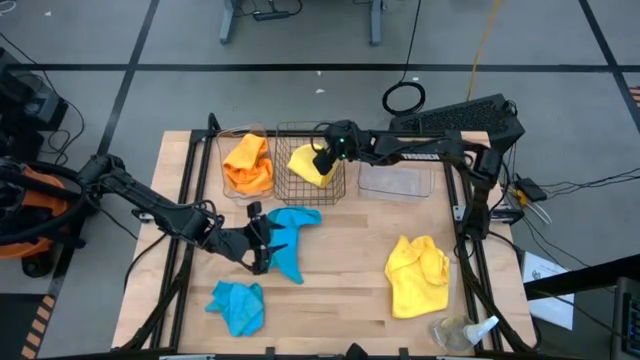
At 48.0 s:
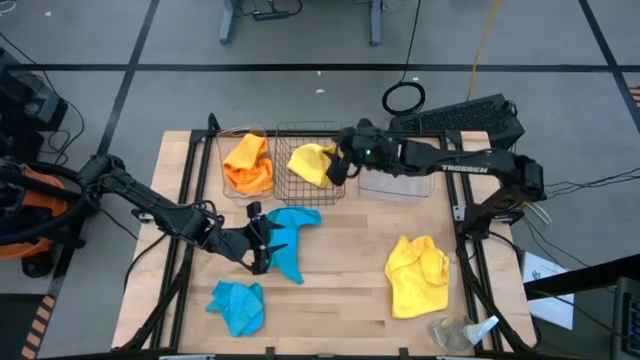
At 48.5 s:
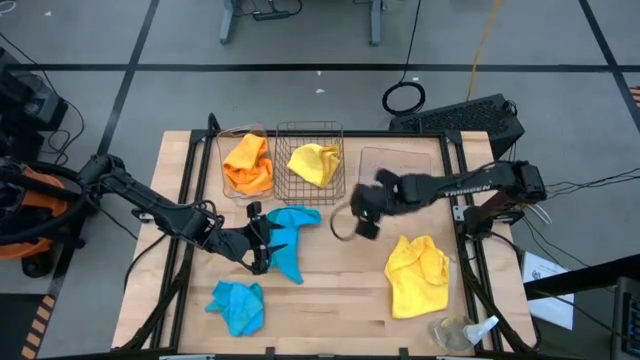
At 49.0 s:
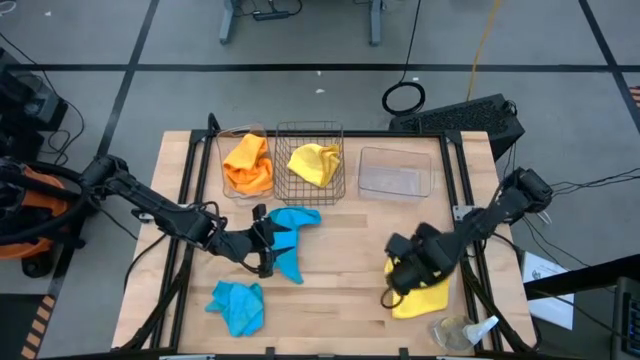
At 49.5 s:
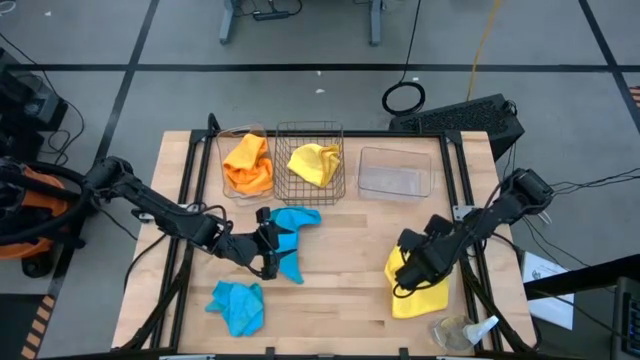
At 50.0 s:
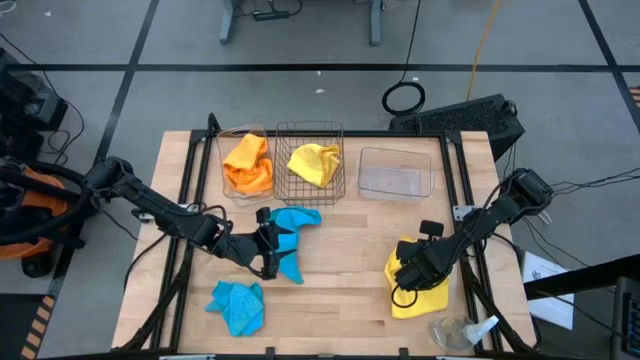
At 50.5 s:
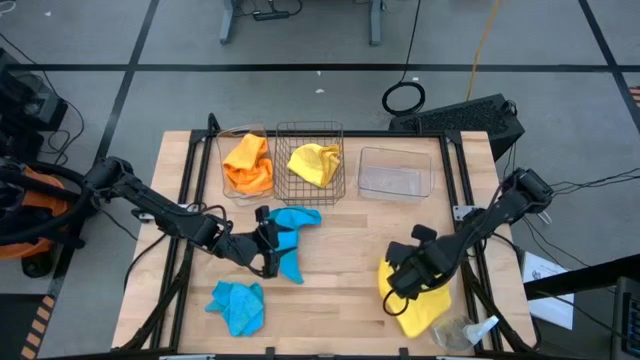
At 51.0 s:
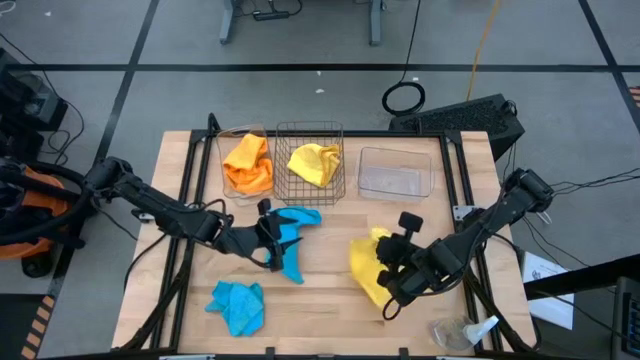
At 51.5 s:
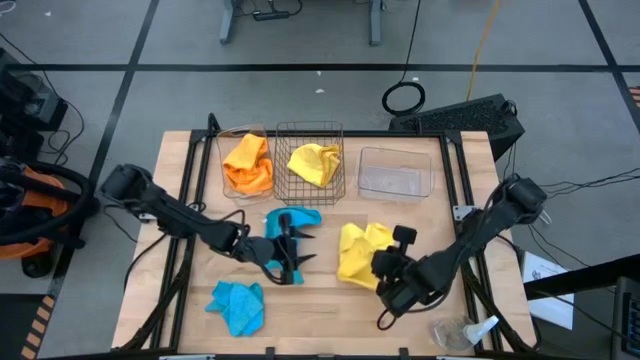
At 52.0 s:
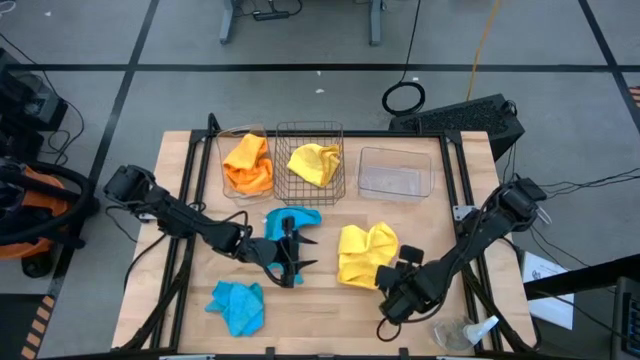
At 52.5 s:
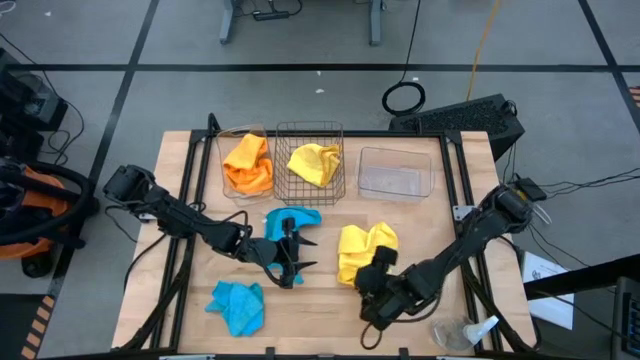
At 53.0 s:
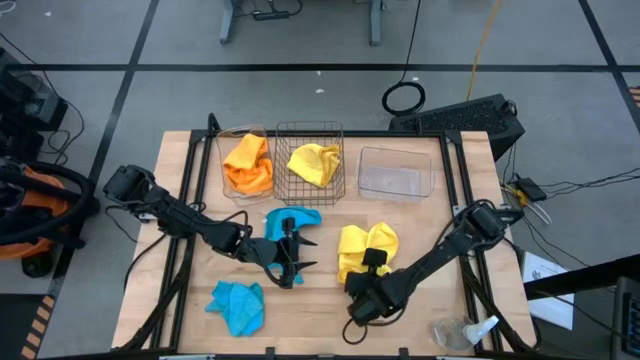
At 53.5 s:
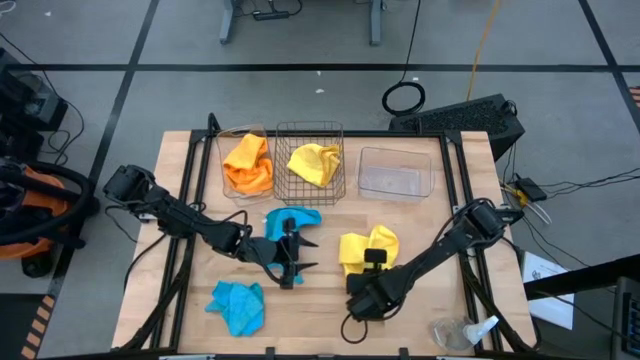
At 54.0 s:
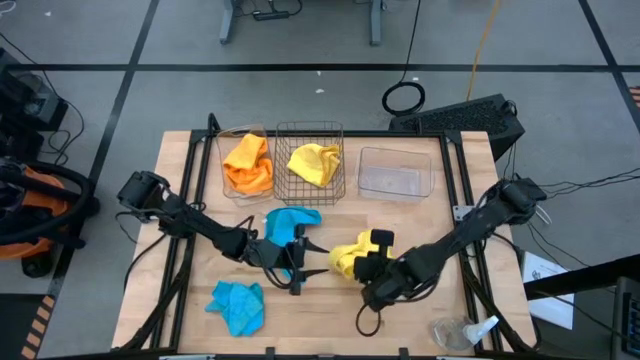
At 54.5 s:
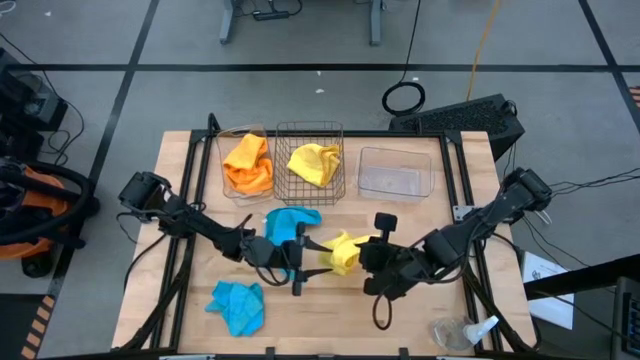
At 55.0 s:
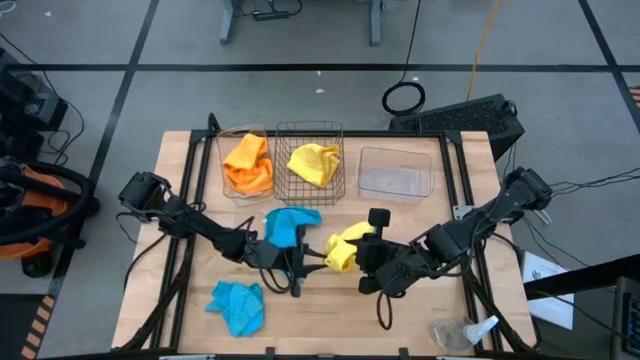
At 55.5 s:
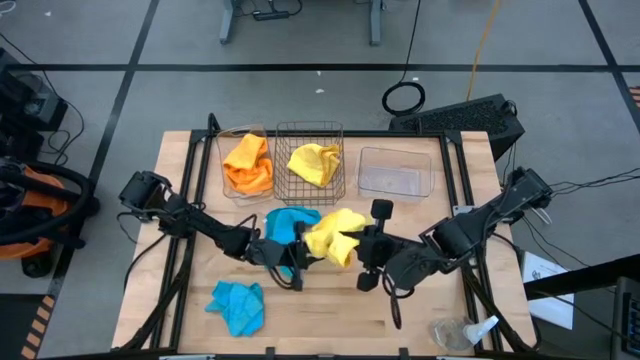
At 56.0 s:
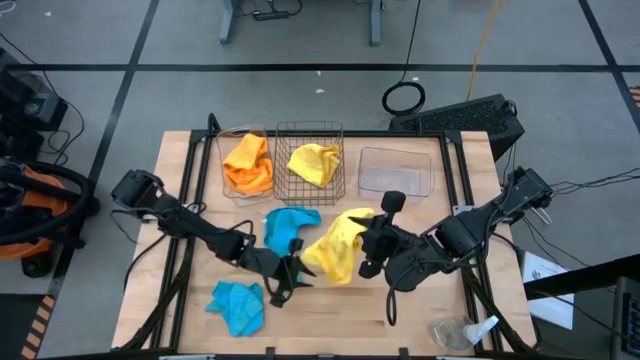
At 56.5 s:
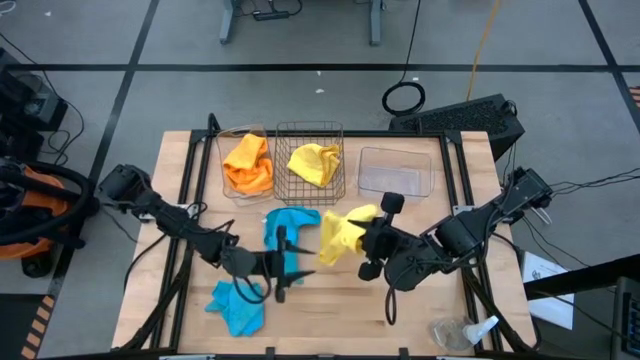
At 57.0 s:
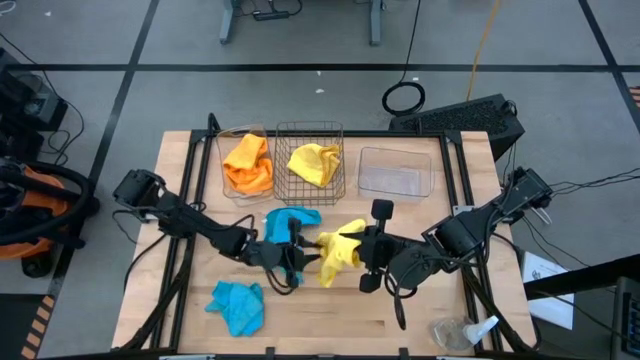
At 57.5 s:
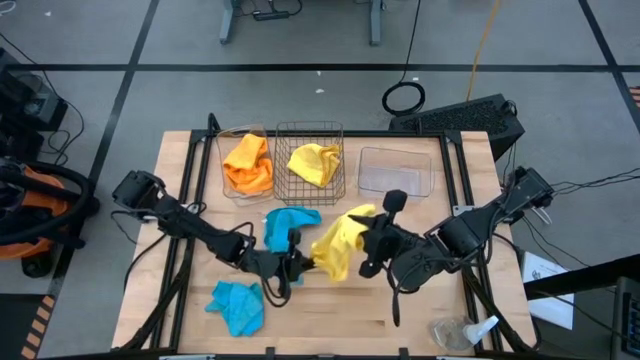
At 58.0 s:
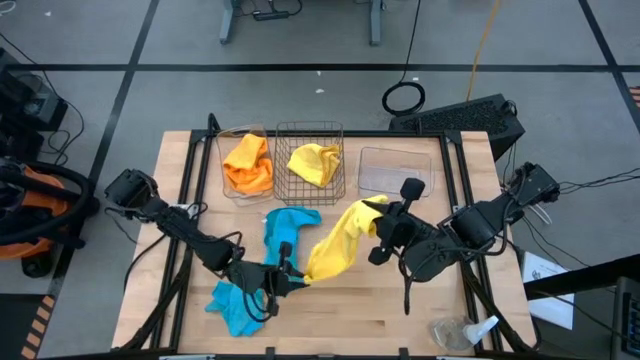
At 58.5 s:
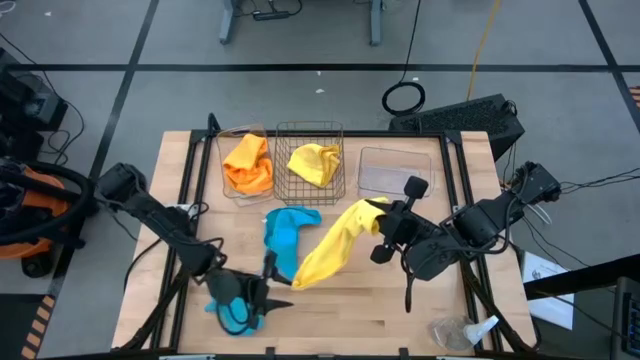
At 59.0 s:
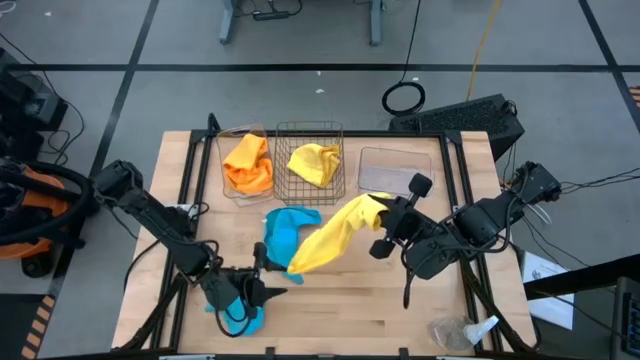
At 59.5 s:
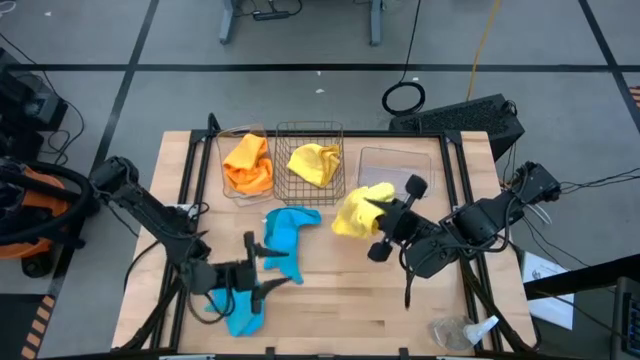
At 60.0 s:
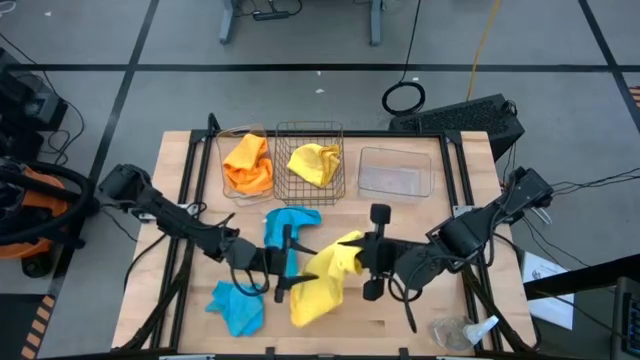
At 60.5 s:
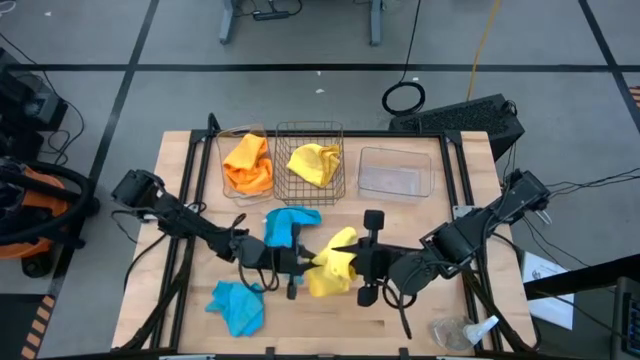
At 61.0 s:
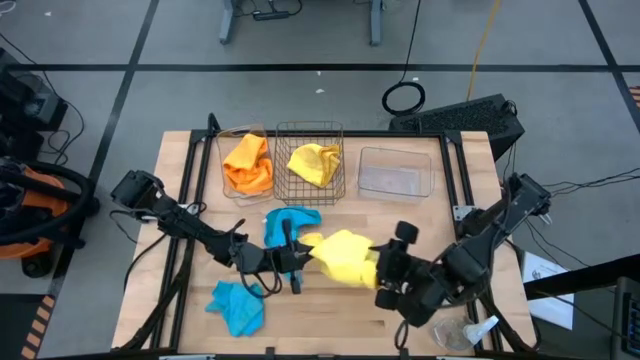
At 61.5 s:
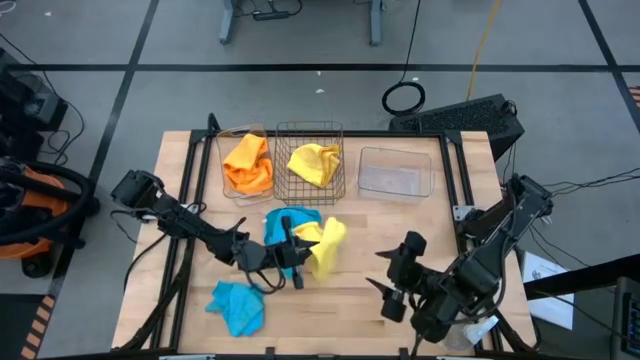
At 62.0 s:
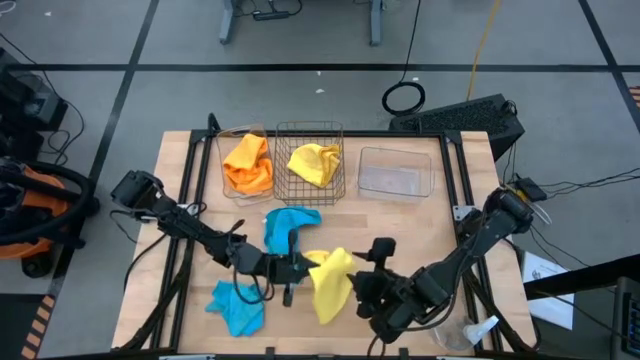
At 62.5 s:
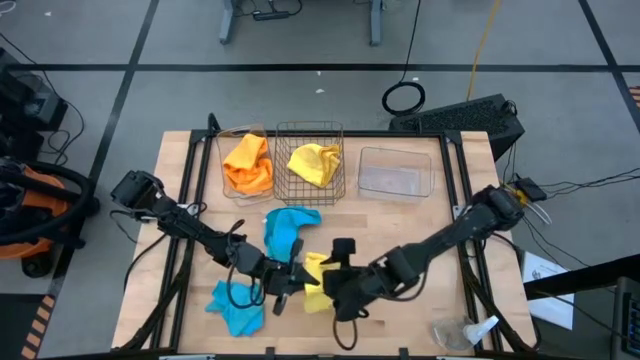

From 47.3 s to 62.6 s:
Task: Sort microfiber towel by color & place in baskets
Put the yellow microfiber cloth into the wire basket

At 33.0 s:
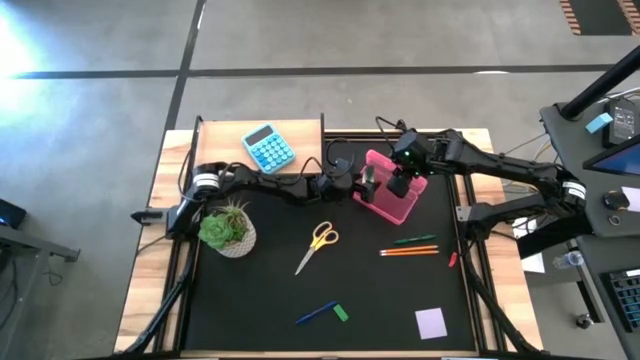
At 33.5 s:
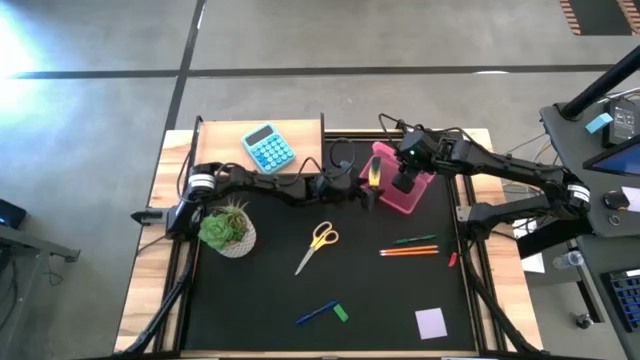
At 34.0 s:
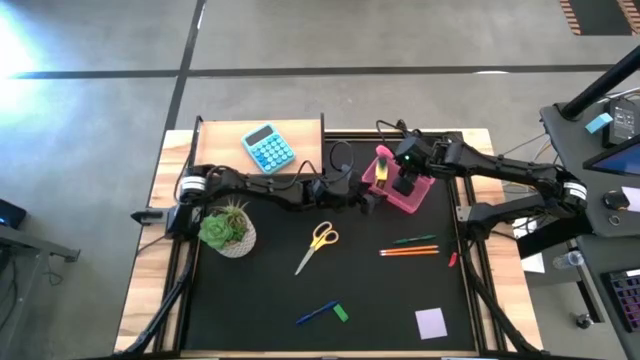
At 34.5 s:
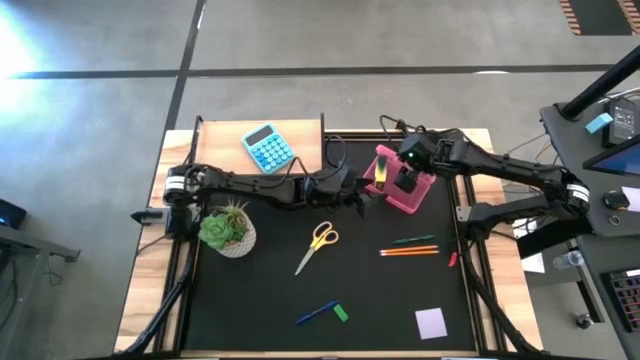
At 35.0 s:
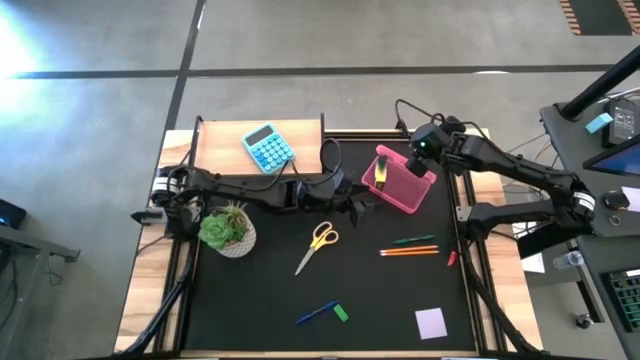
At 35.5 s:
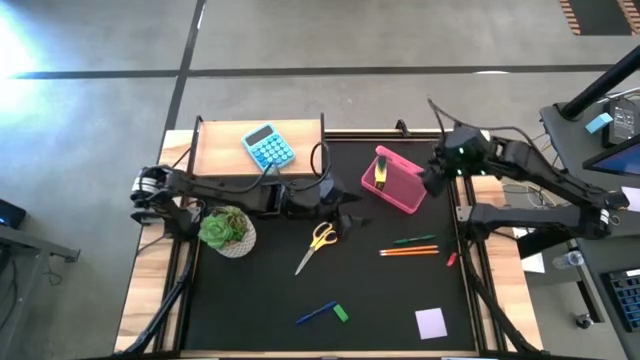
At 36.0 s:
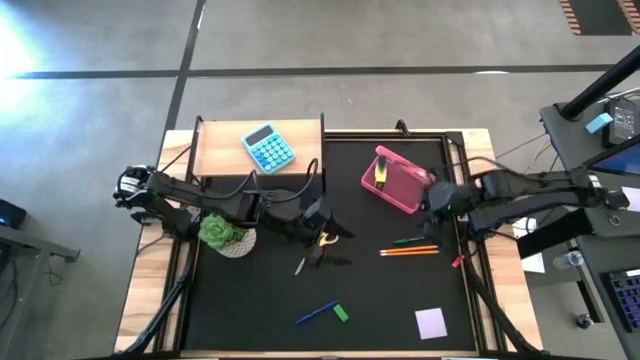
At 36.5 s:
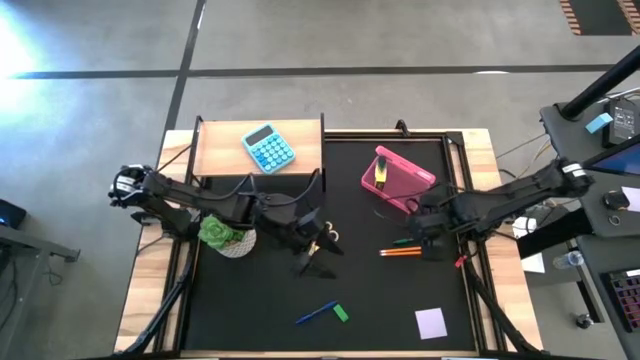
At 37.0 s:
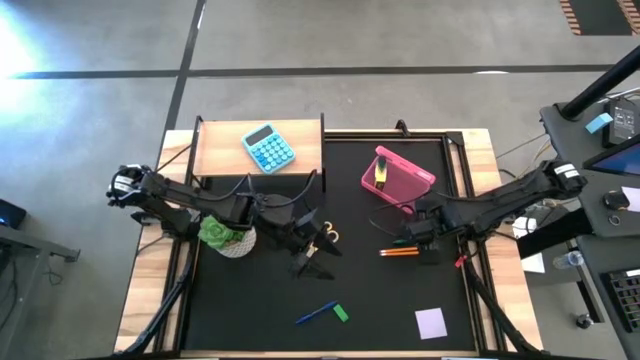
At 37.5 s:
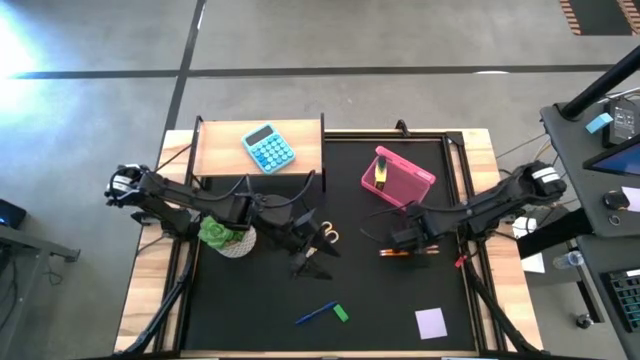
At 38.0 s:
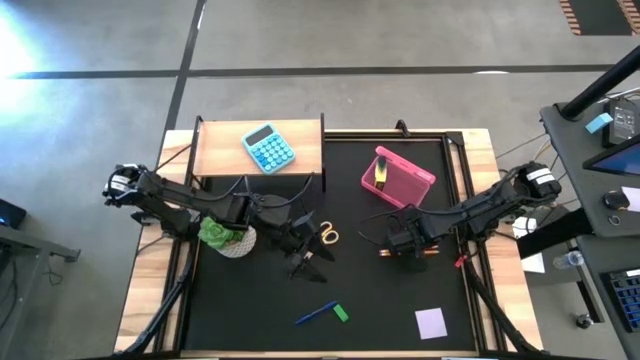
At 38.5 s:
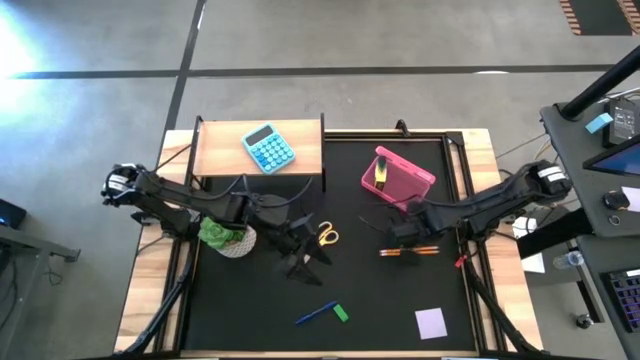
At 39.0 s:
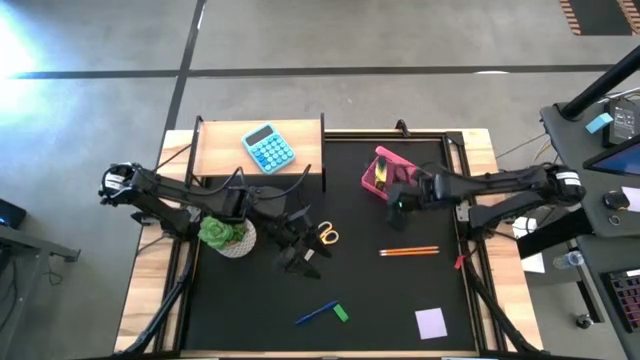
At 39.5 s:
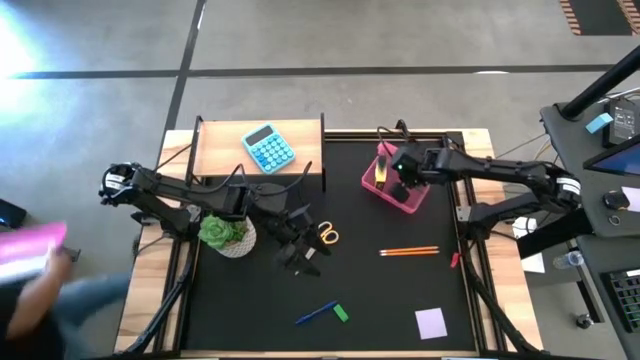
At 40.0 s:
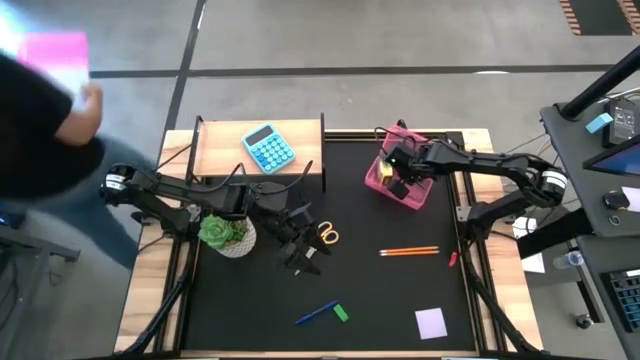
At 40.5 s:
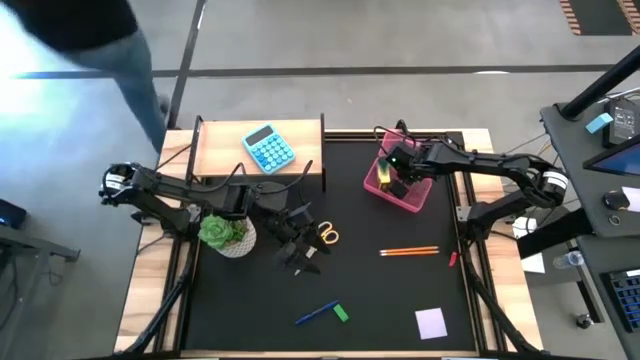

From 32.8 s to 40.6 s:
Task: Pack school essentials
Put the green pen into the pink supply box
